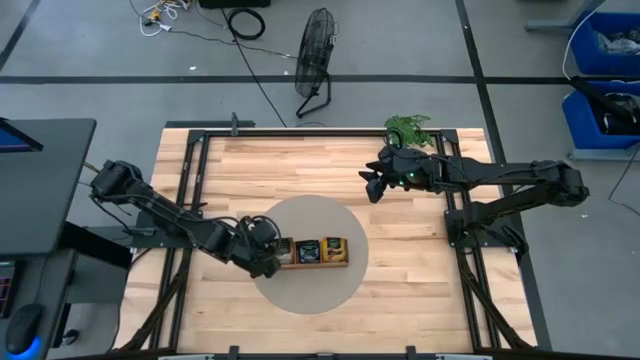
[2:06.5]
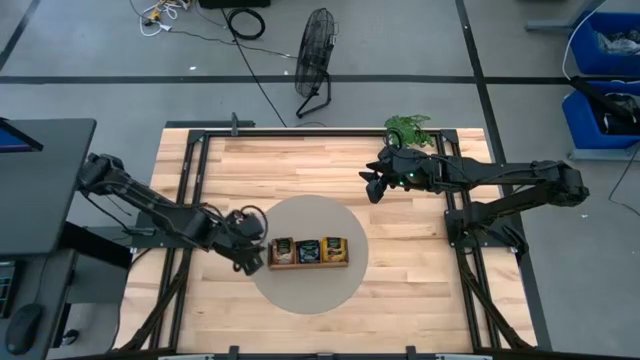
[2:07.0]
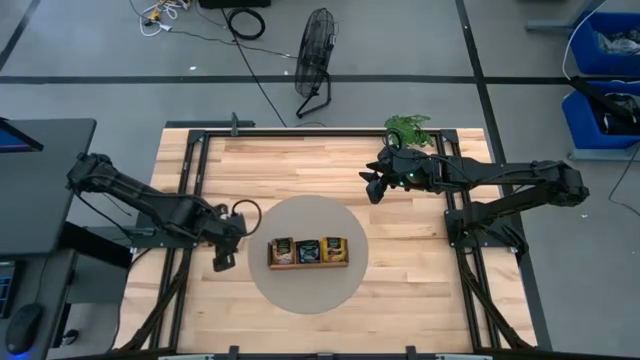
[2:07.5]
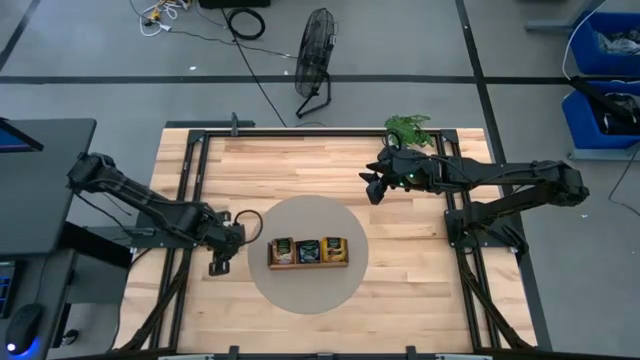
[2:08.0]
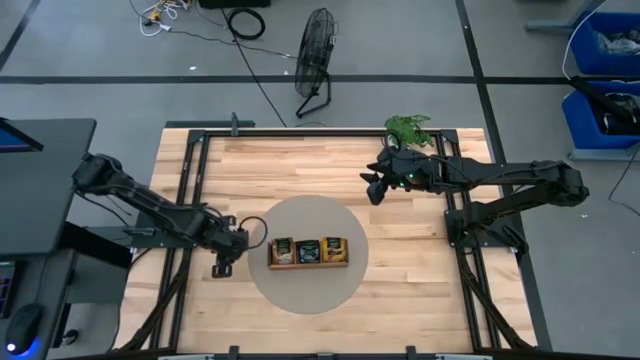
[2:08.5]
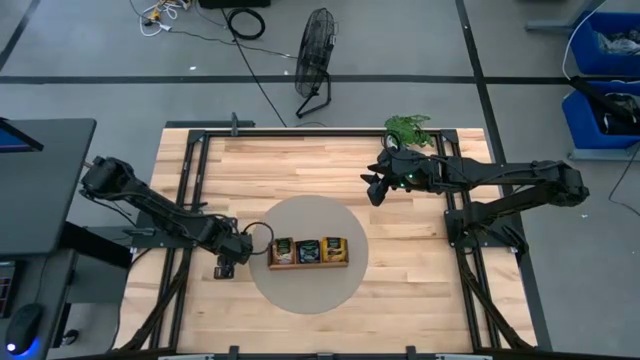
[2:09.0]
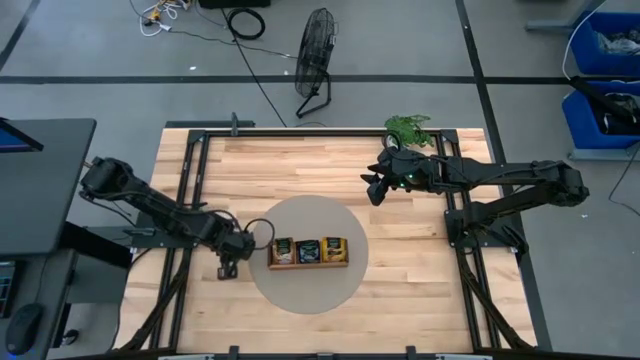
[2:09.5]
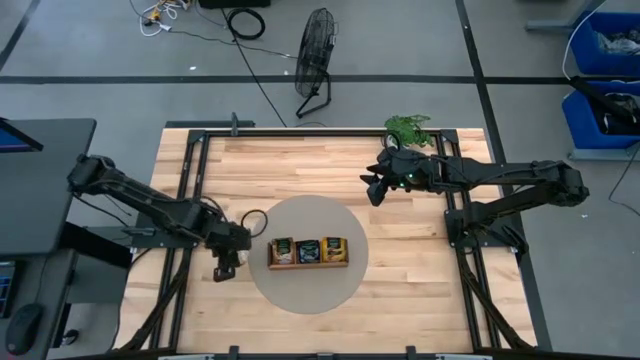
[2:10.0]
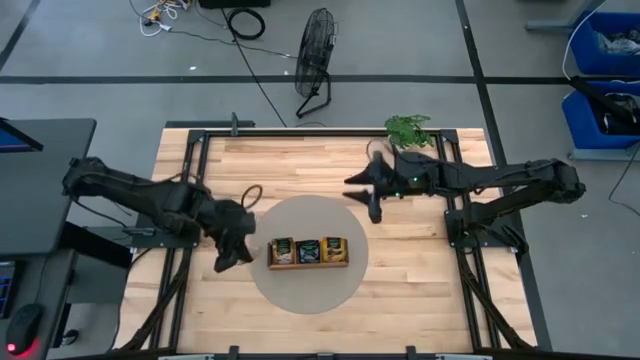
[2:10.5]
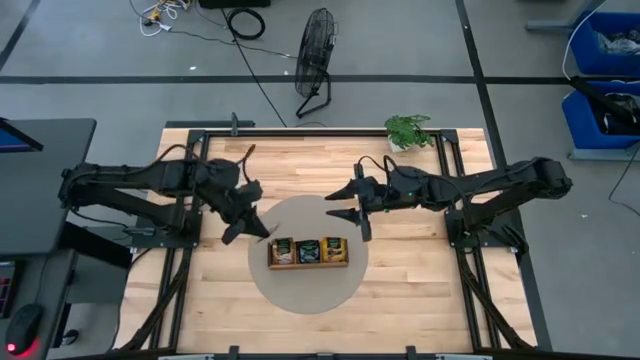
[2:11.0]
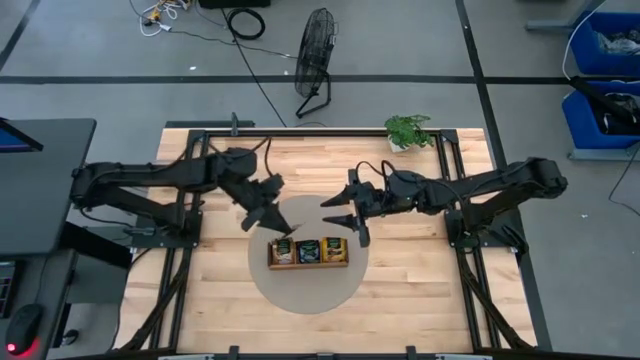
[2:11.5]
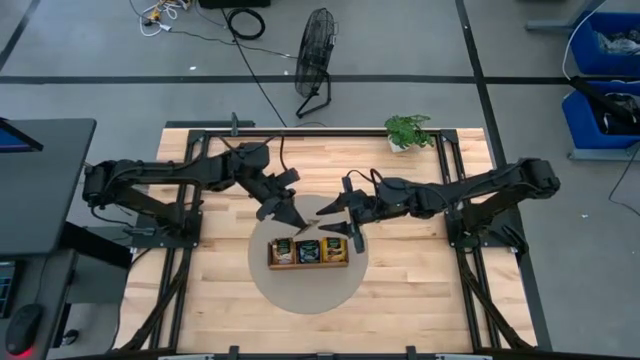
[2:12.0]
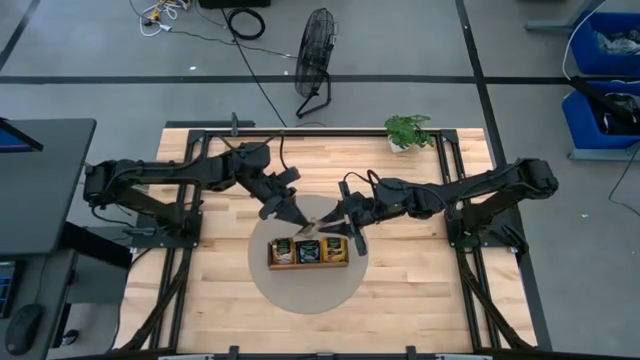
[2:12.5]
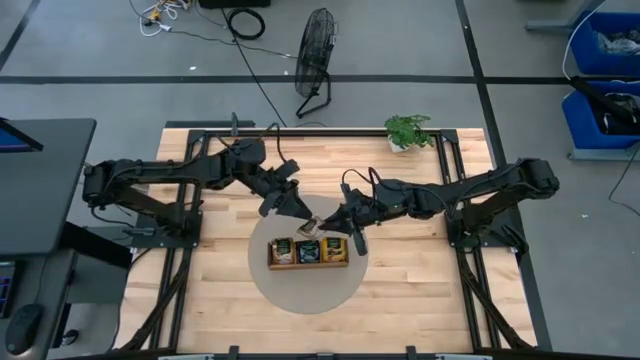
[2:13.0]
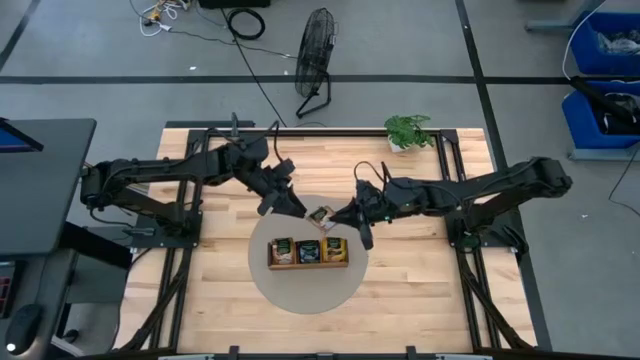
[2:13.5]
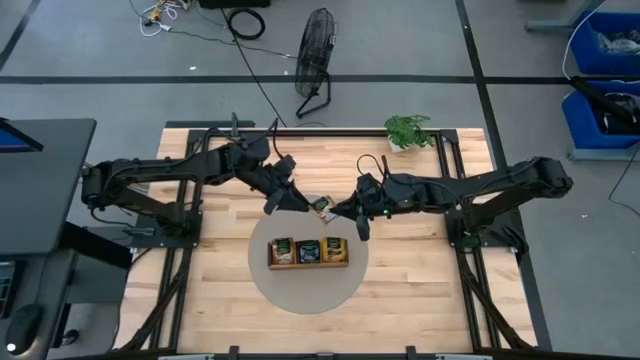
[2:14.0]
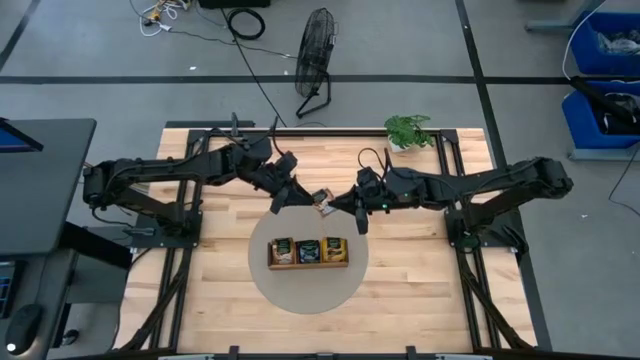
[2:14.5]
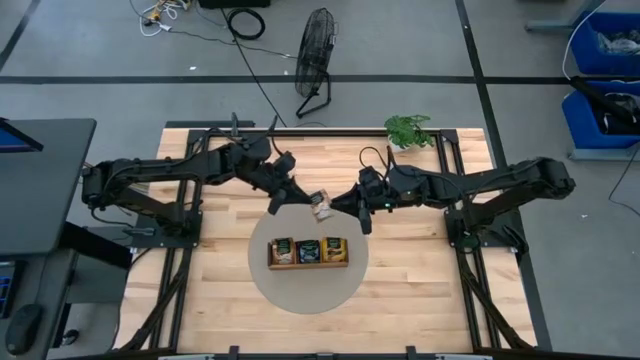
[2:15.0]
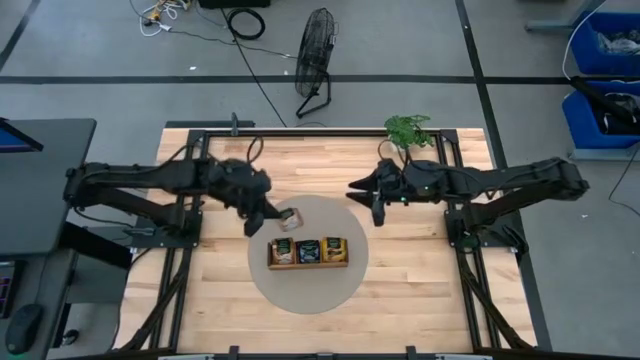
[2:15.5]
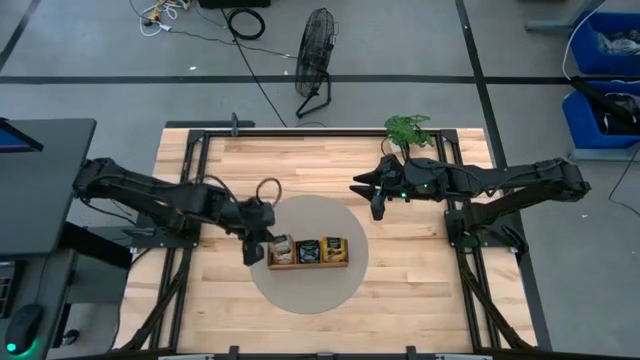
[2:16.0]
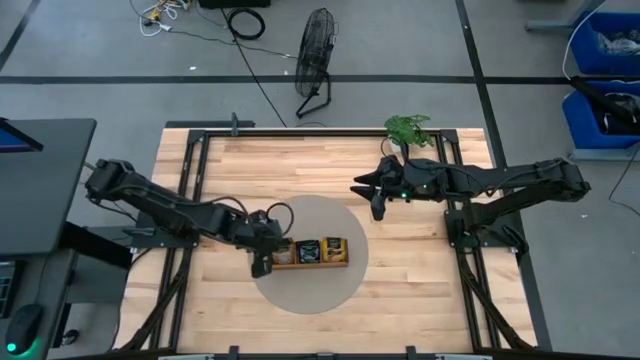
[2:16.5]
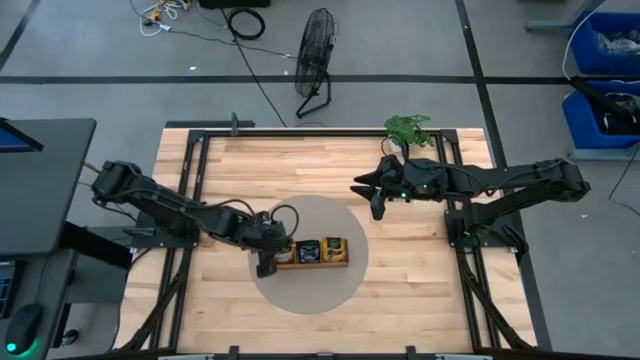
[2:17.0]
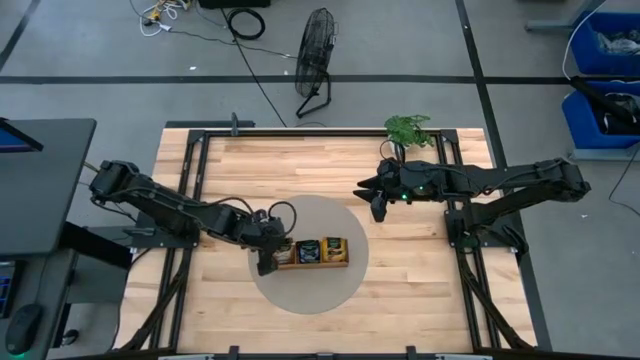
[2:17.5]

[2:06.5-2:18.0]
Task: Pick & Place Tea
Put the brown tea bag into the left section of the wooden organizer

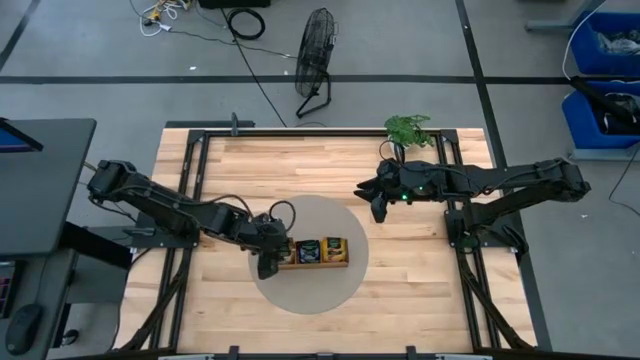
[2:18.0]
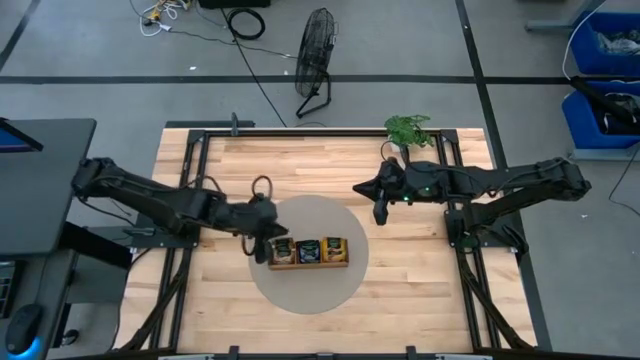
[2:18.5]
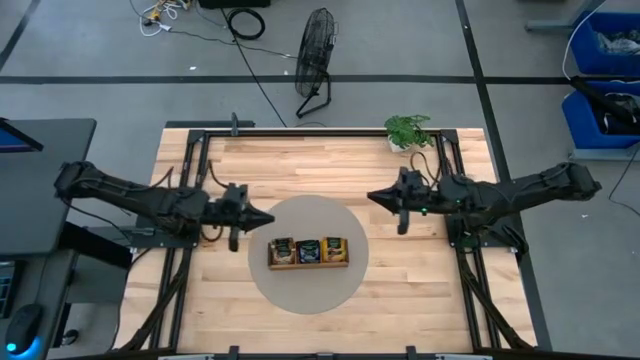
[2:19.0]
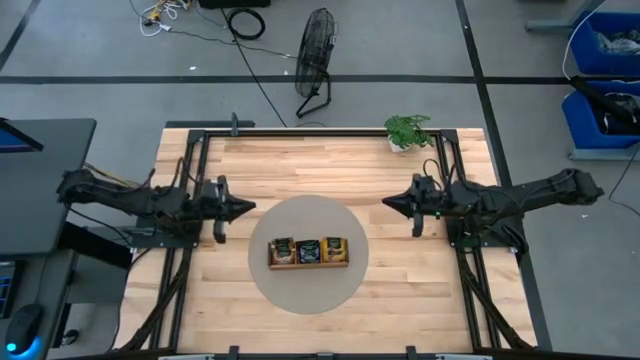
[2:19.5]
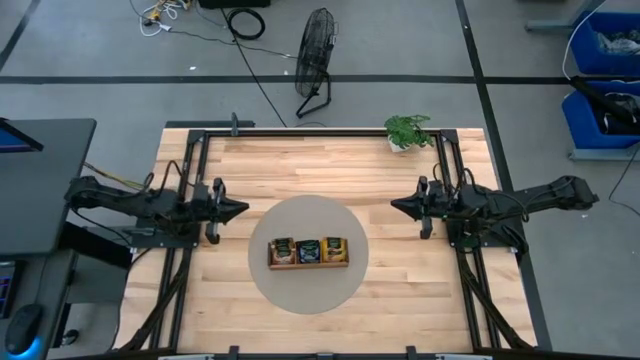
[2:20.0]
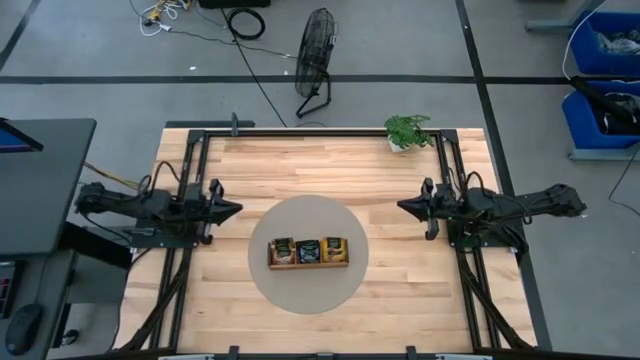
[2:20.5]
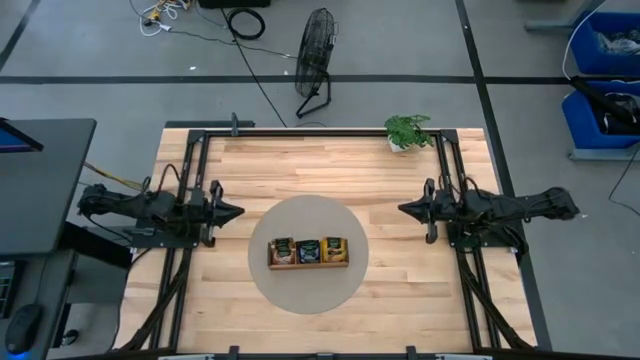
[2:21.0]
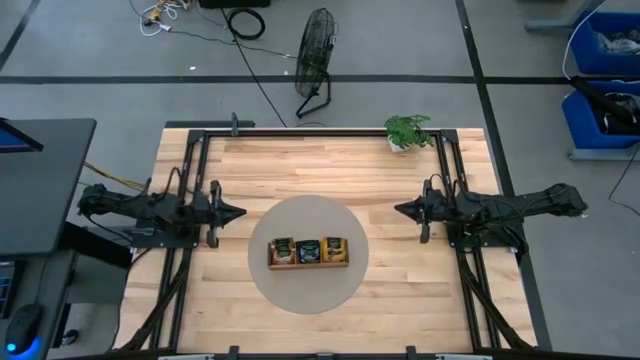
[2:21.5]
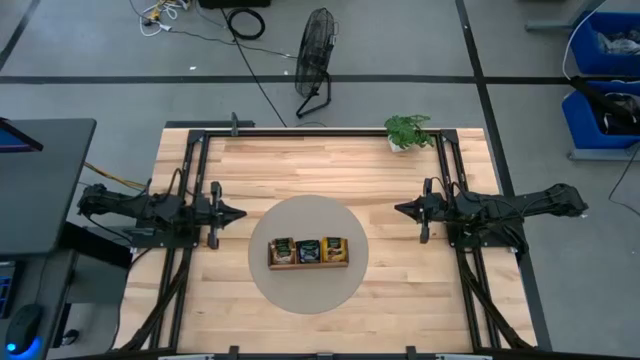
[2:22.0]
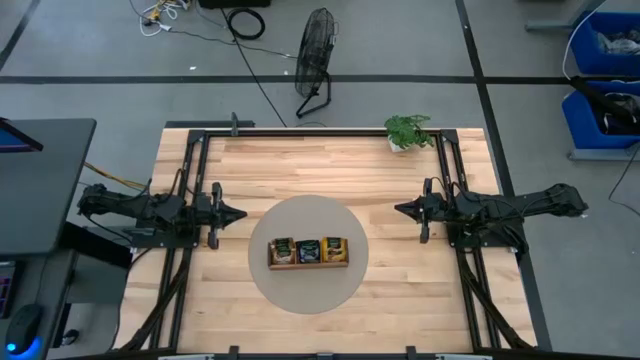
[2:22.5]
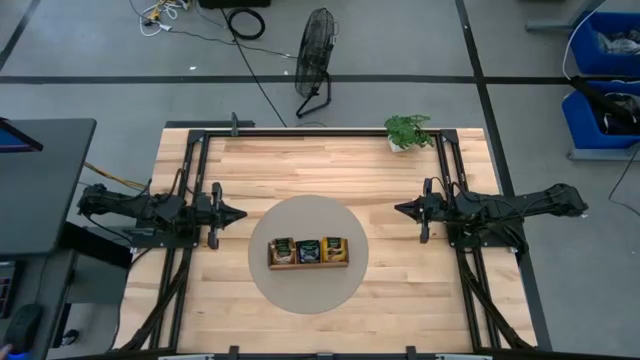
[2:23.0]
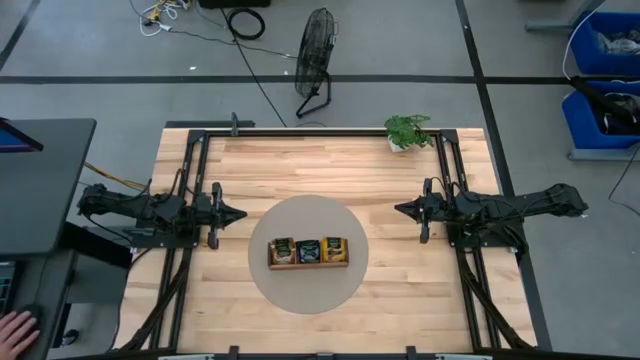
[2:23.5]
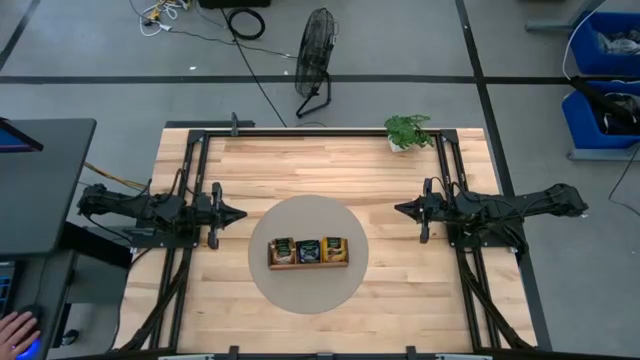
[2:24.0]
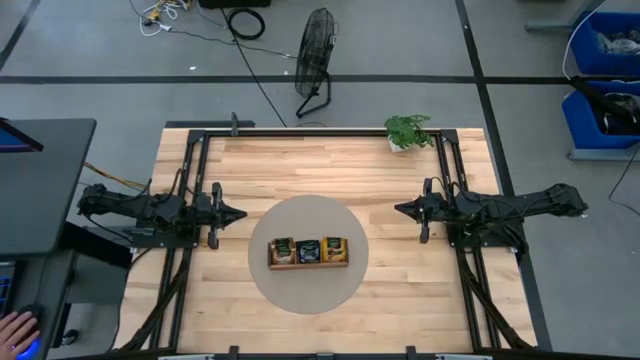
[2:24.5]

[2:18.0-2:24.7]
Return to Home Position

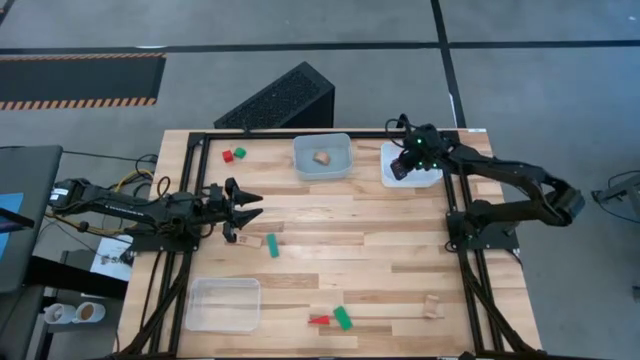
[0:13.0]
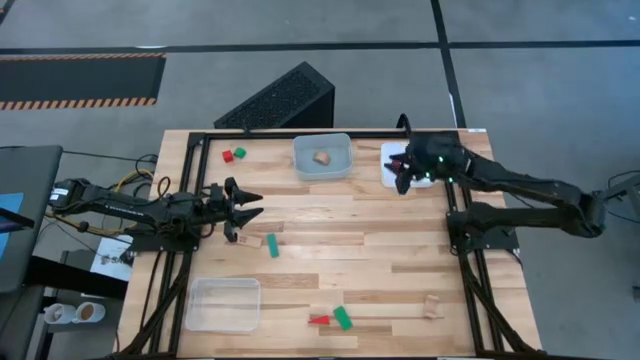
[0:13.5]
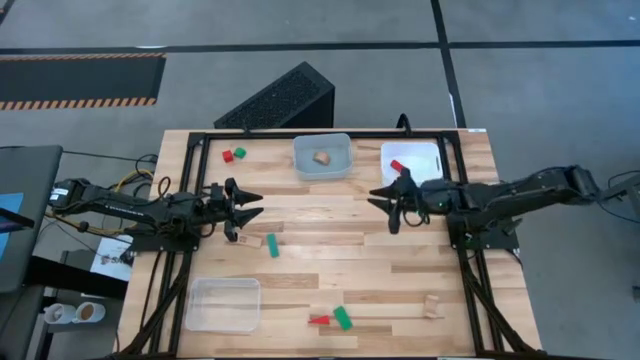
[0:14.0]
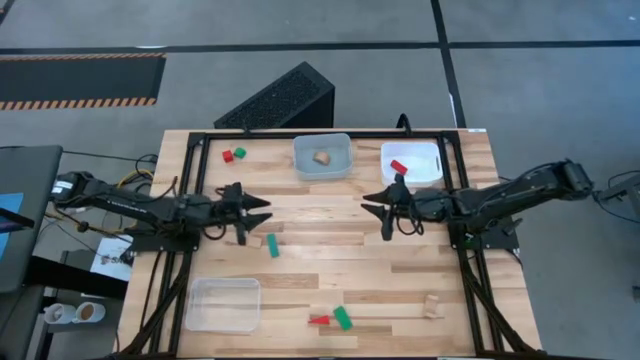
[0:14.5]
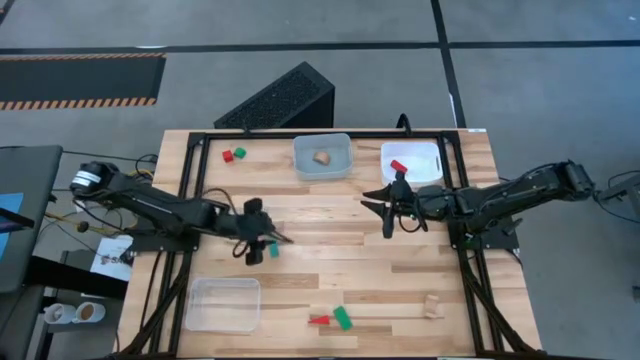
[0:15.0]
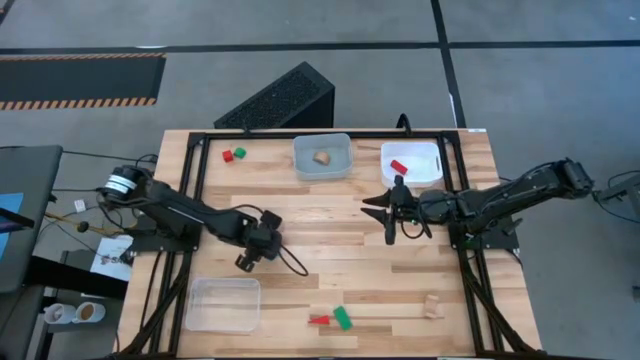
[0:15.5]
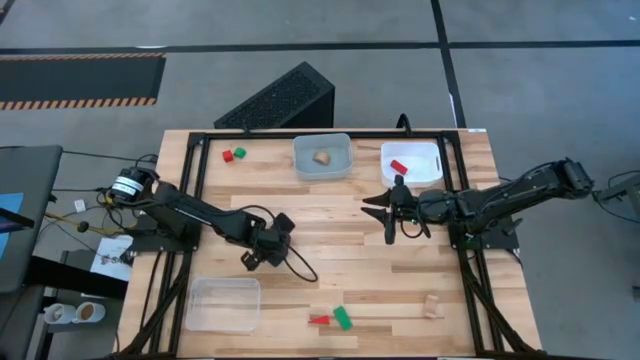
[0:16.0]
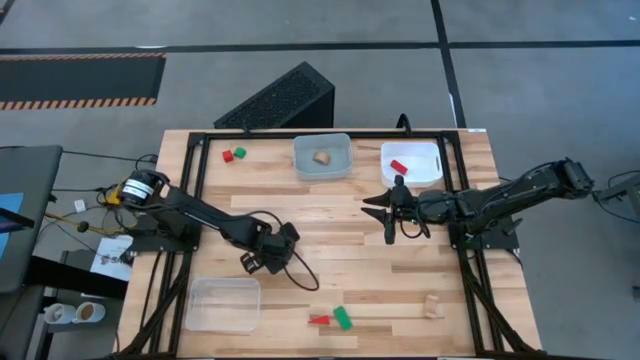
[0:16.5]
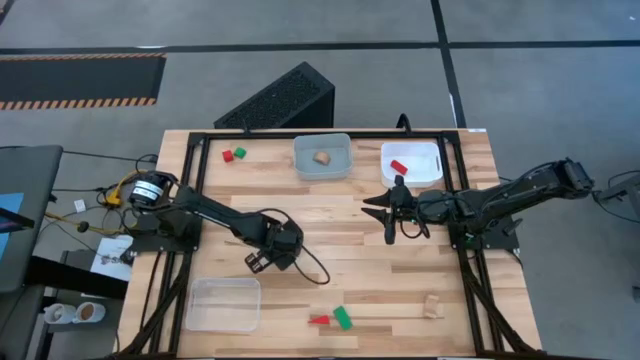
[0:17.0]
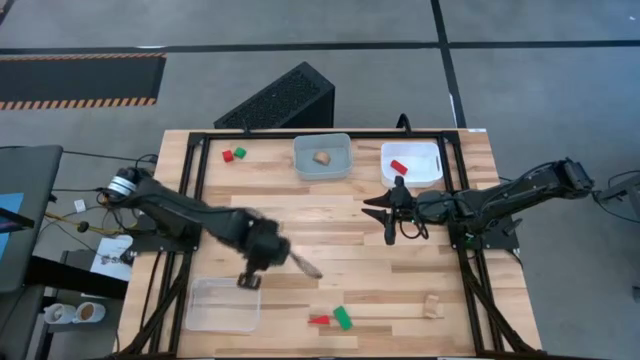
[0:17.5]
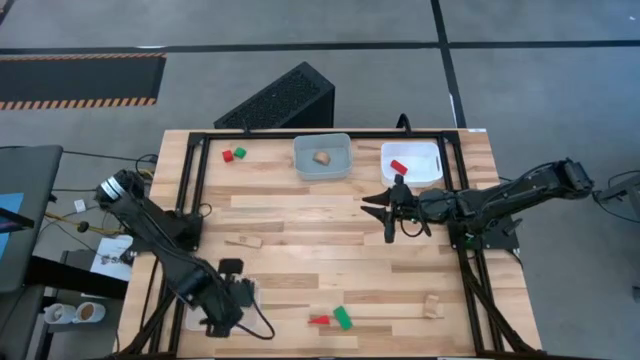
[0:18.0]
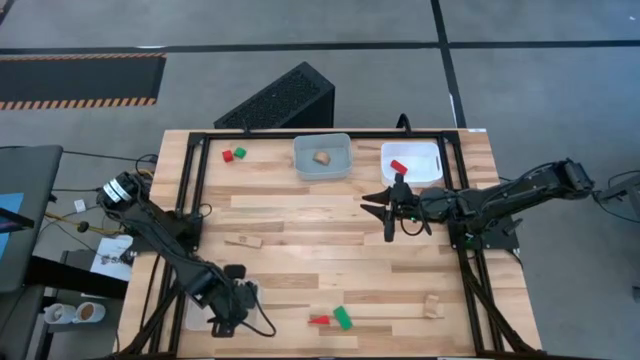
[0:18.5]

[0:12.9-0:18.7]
Task: Sort & place blocks by color
Put the middle green block into the transparent bin
